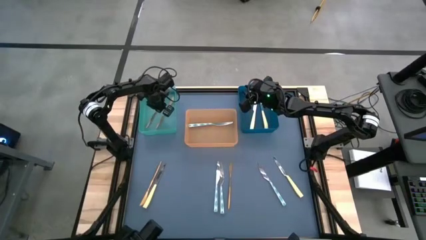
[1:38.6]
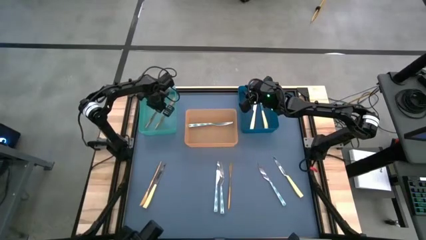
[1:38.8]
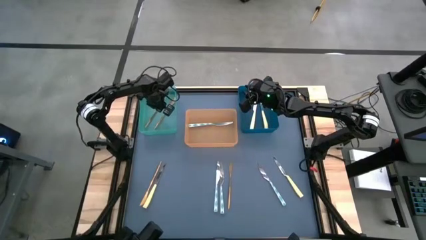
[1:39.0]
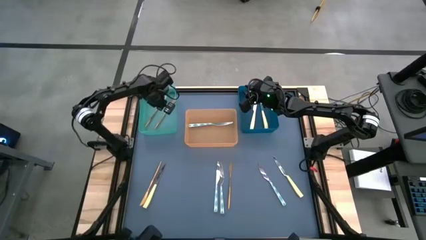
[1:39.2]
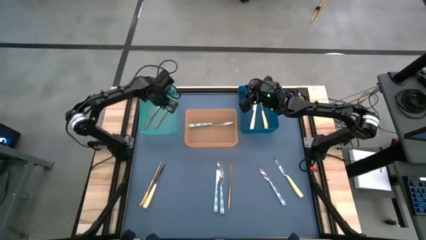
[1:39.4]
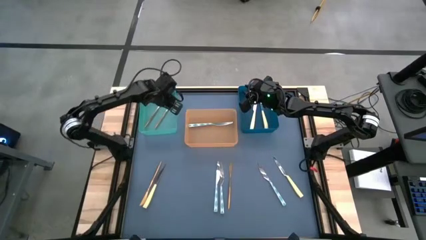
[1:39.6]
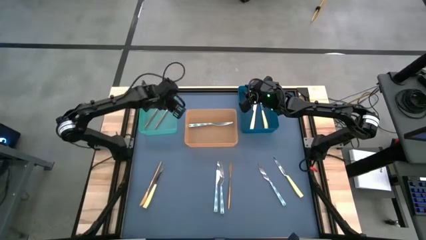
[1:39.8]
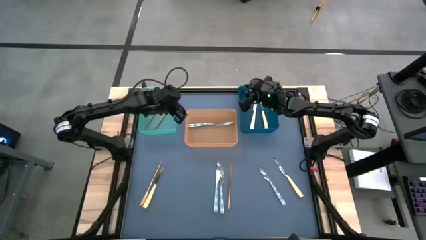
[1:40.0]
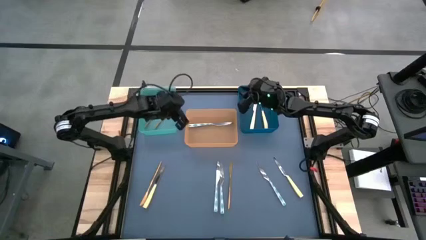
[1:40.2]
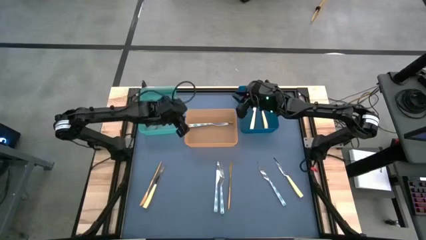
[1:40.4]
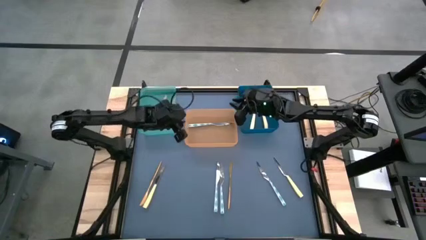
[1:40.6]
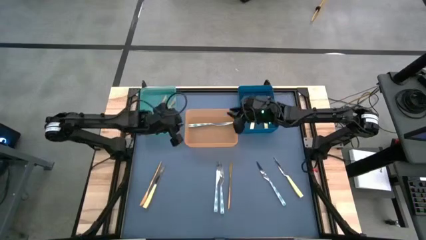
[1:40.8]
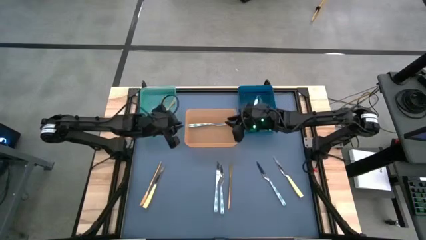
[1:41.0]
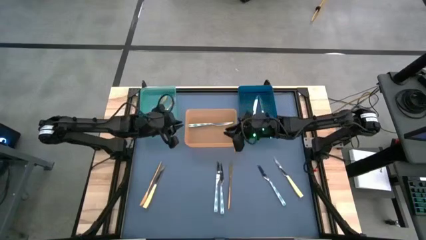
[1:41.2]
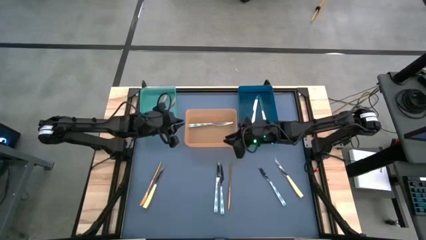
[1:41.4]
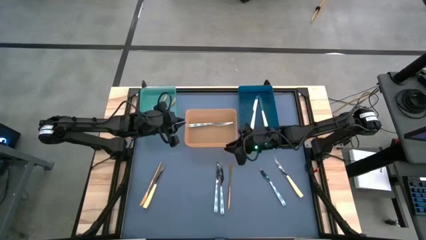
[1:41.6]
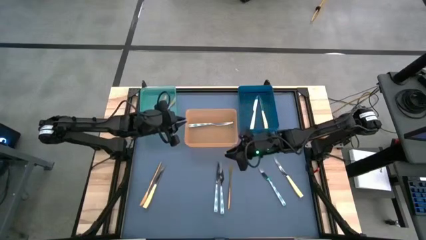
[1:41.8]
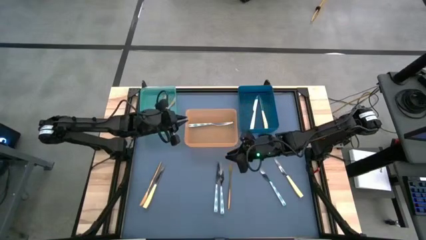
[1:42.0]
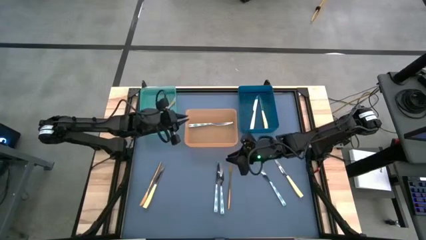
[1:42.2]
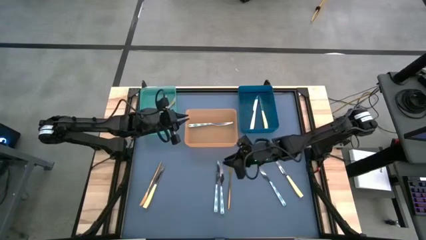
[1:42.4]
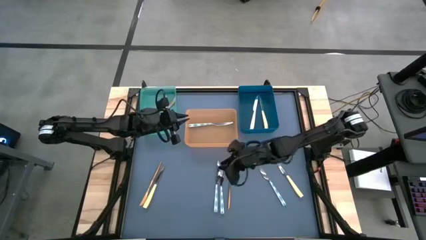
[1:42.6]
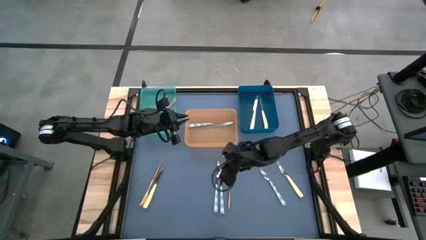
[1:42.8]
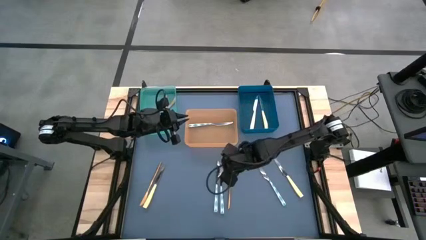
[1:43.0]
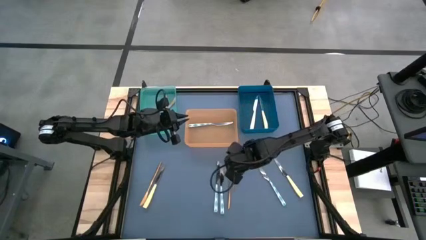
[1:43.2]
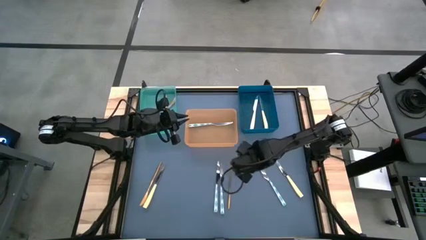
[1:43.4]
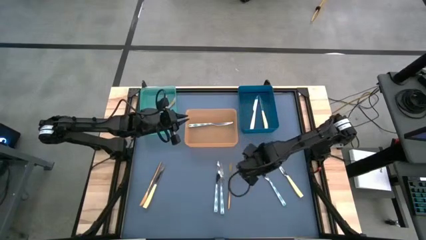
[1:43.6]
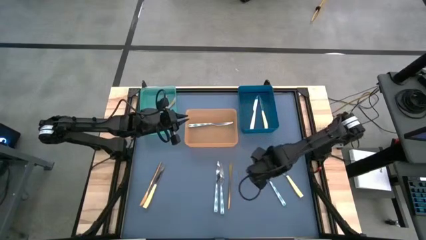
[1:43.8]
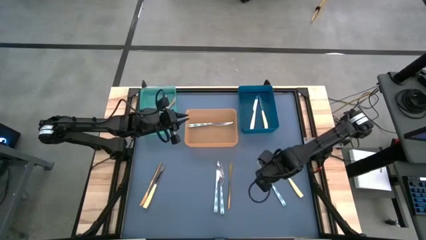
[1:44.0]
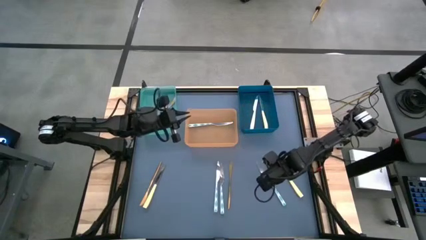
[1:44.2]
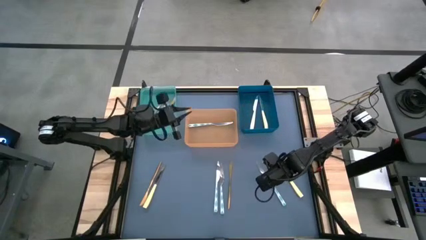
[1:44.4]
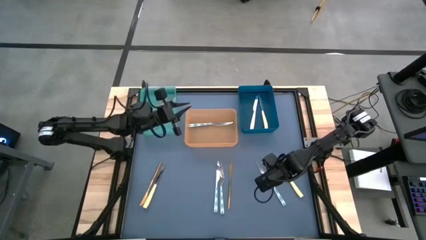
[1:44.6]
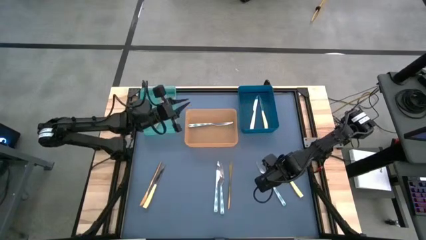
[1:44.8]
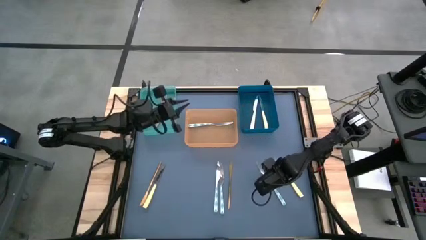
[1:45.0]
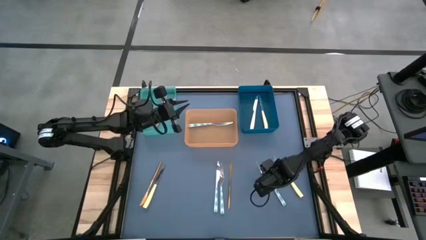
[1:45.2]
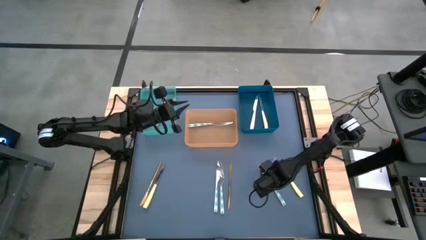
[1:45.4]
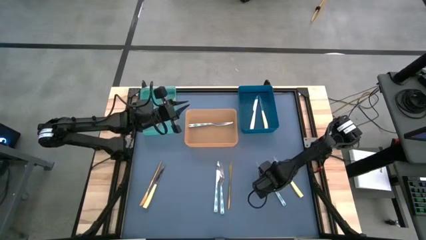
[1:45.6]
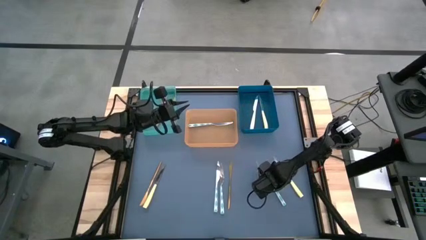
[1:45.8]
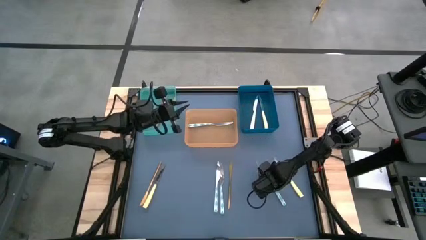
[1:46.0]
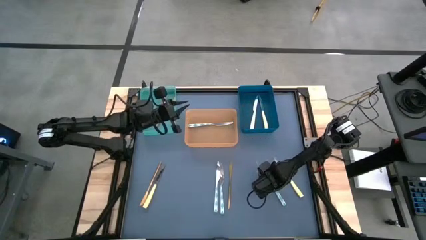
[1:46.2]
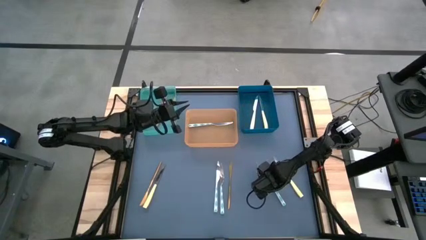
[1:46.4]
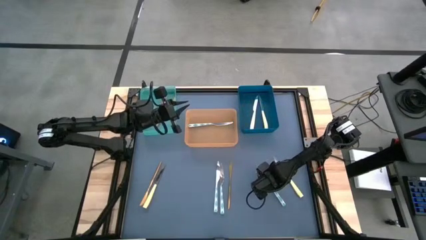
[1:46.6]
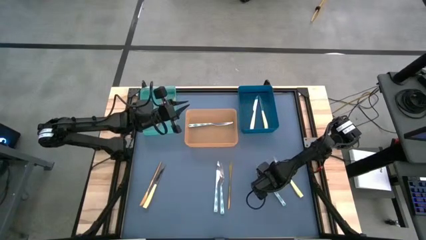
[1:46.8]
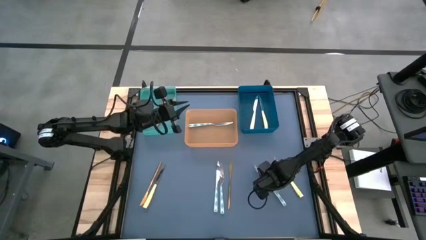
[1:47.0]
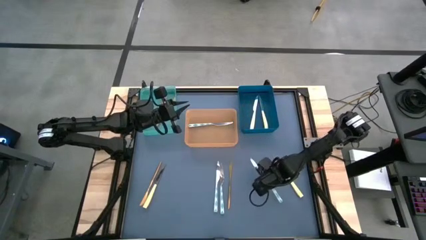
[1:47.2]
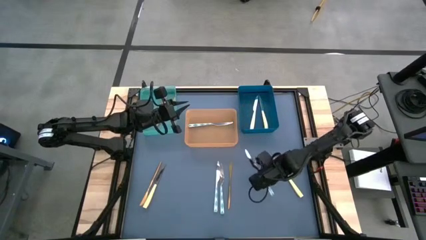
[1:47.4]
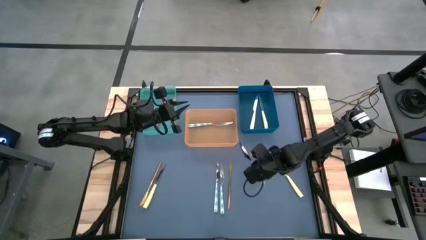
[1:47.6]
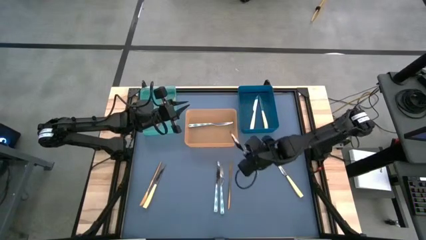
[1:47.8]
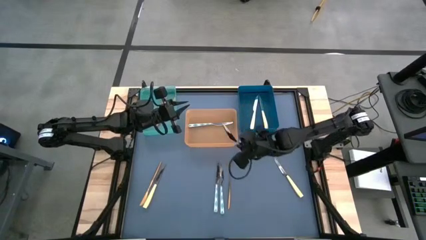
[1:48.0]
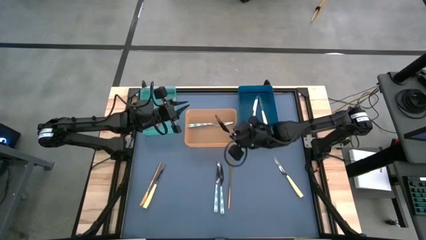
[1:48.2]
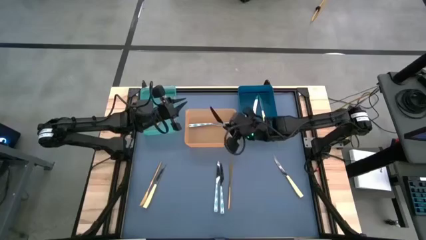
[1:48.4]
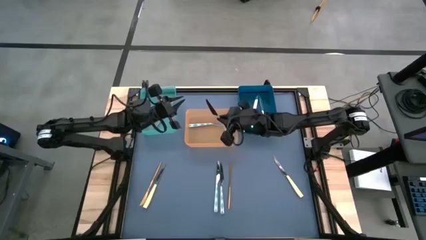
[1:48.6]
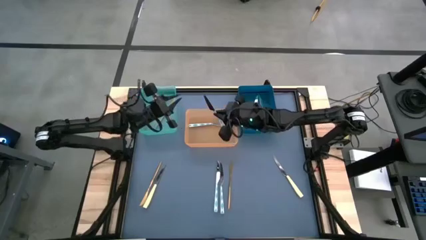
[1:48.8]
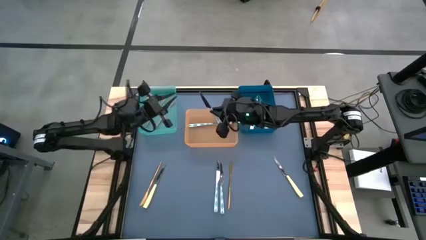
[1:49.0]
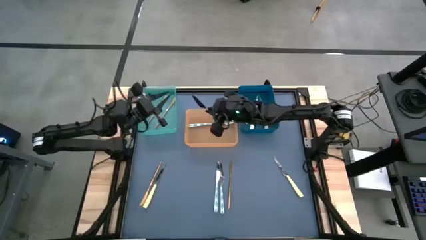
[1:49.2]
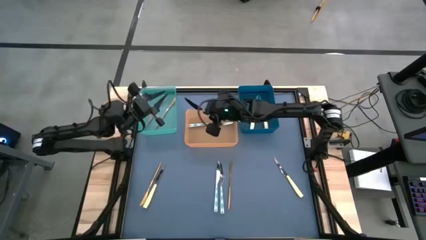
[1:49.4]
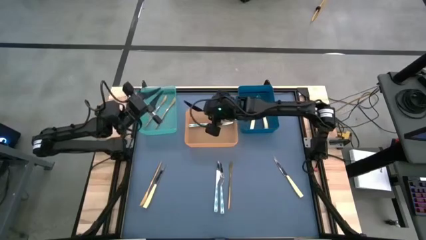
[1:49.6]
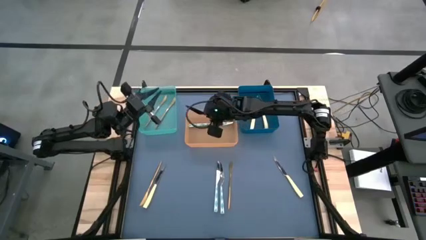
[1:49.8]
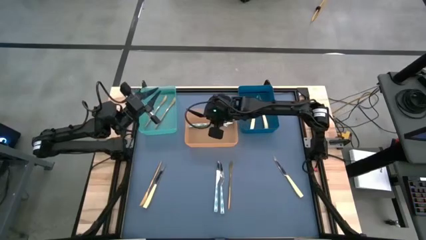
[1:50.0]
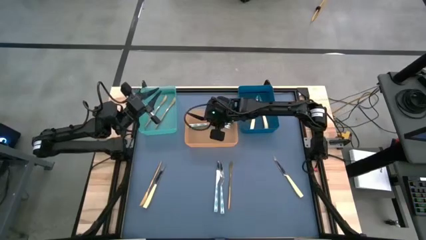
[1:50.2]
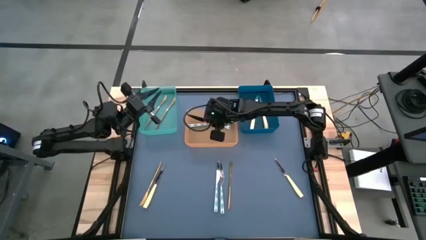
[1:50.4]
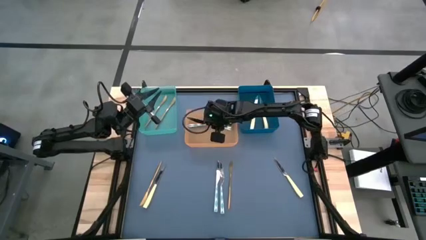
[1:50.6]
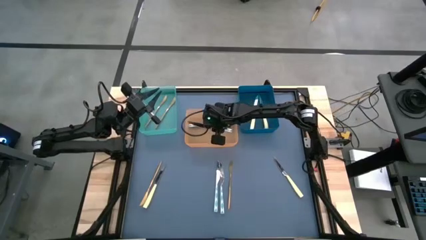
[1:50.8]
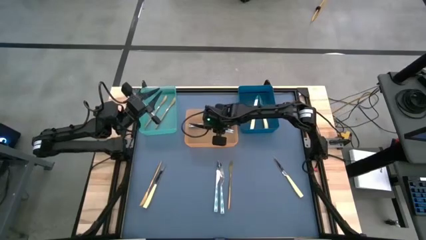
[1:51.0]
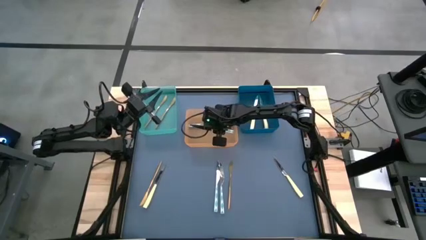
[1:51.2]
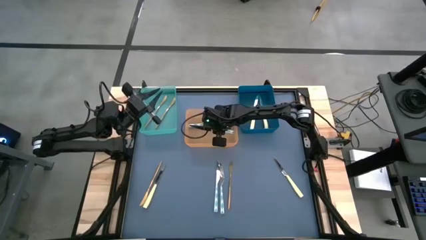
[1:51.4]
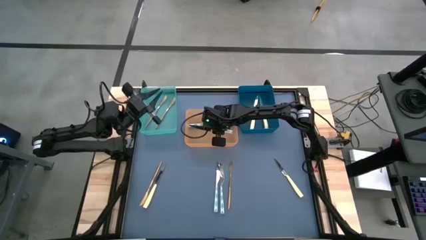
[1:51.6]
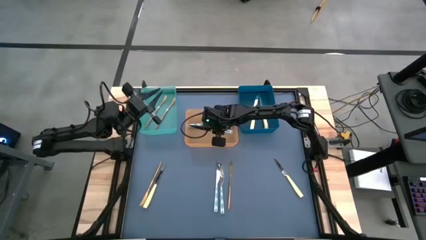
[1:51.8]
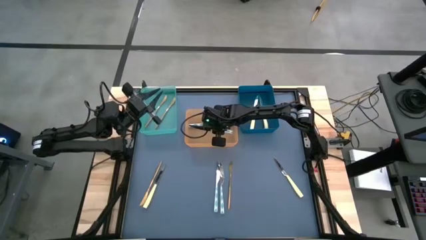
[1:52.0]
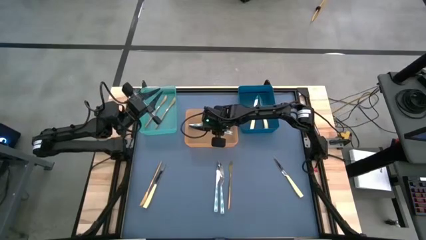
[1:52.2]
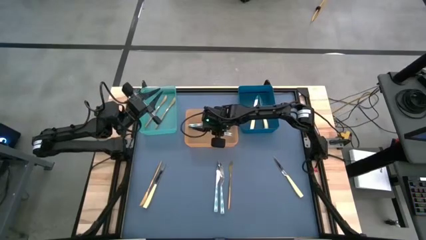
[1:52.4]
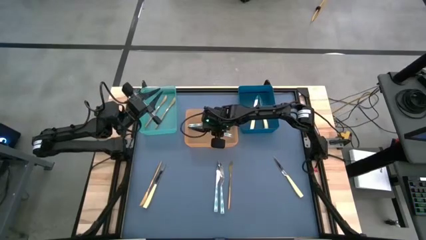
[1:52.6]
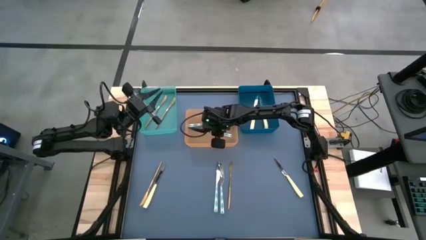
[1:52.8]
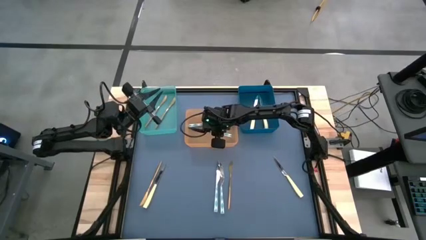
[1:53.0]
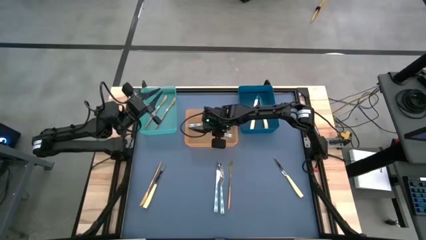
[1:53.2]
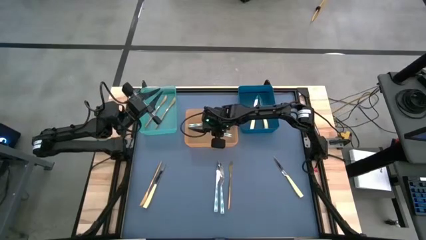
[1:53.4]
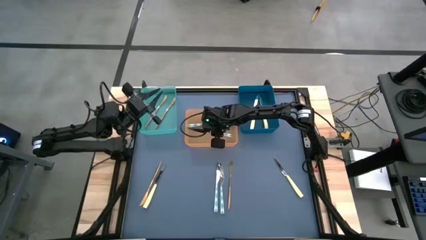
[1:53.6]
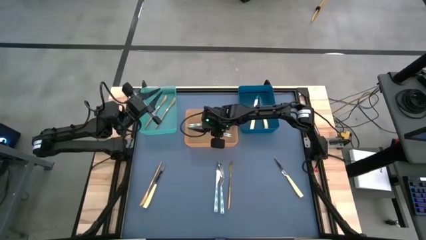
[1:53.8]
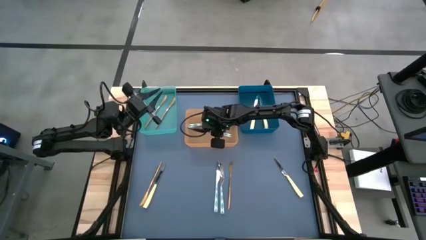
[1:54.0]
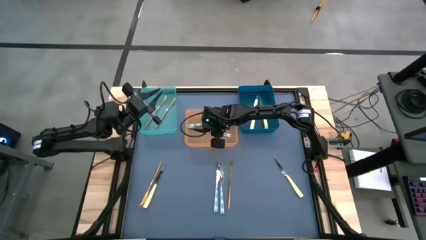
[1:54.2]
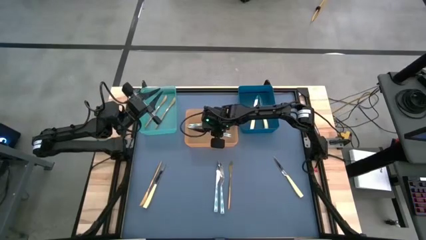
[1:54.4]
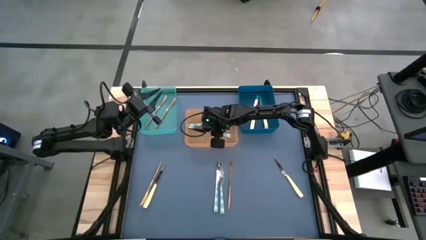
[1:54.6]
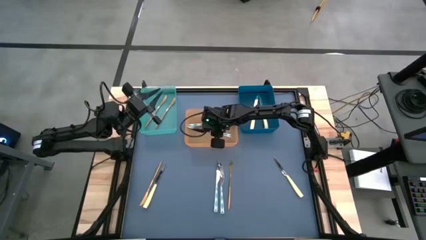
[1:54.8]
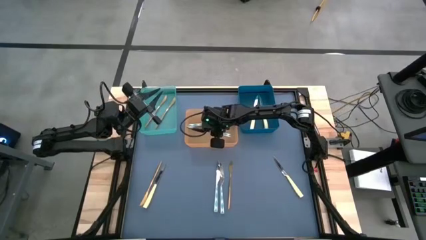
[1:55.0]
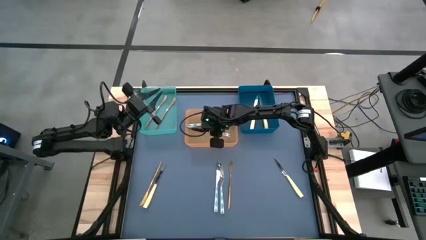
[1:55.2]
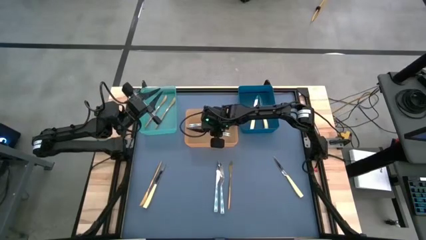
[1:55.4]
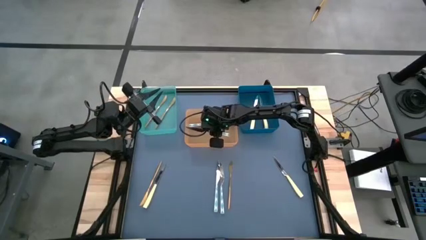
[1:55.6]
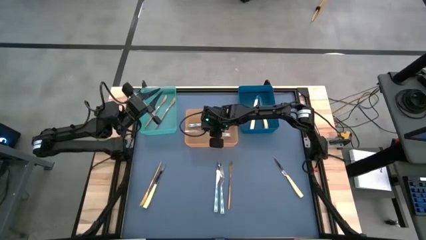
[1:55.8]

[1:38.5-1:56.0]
Task: Sort silverware by color (type)
Put the white knife in the orange bin
